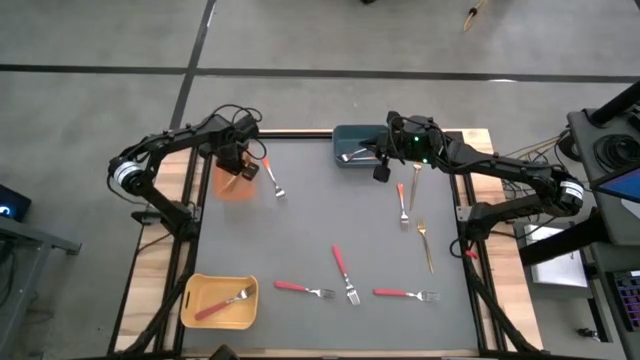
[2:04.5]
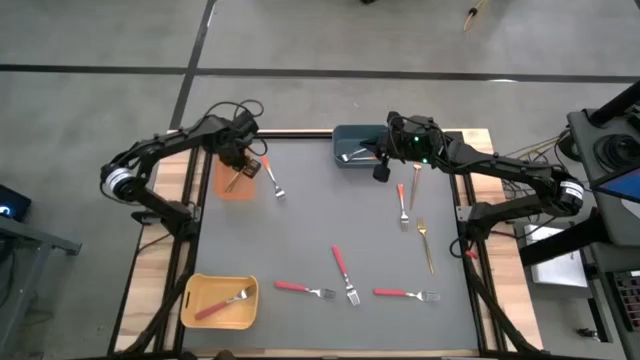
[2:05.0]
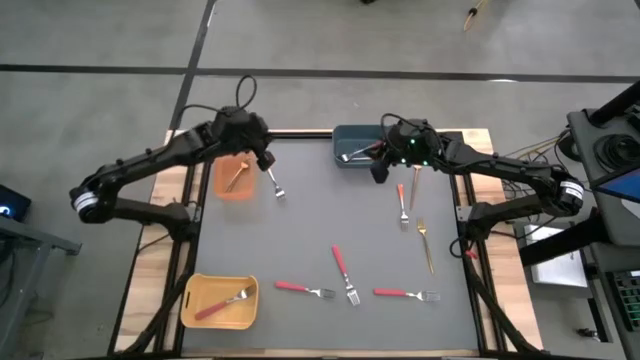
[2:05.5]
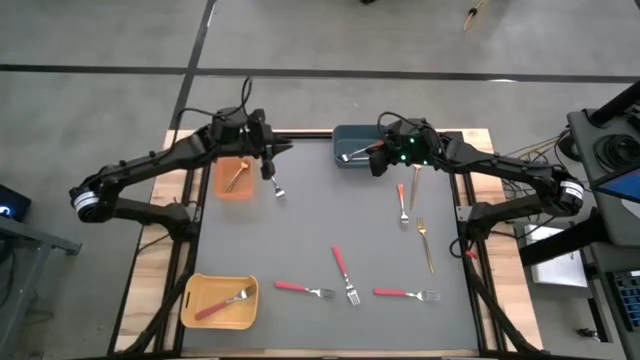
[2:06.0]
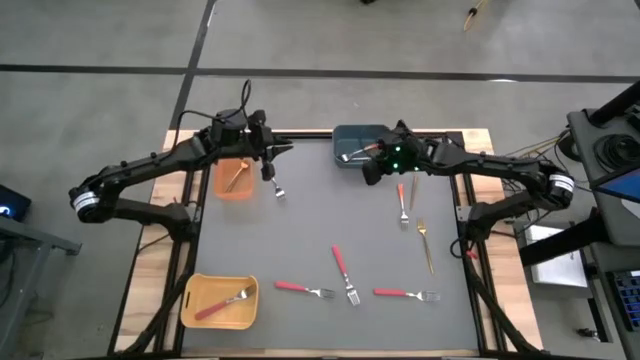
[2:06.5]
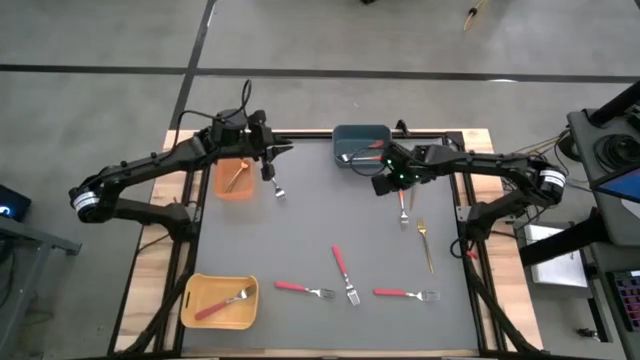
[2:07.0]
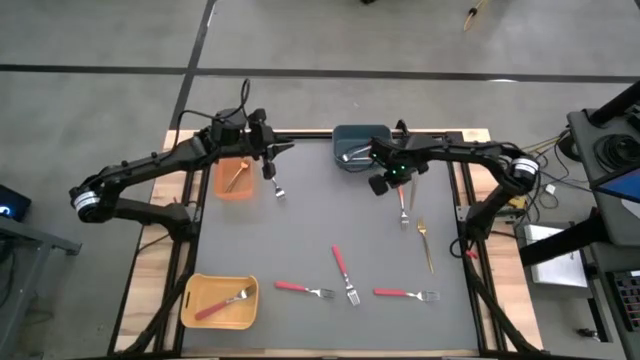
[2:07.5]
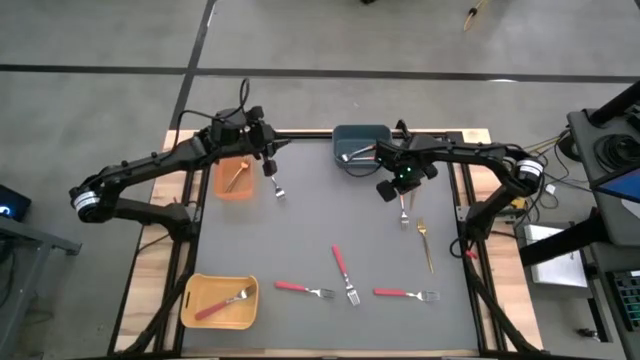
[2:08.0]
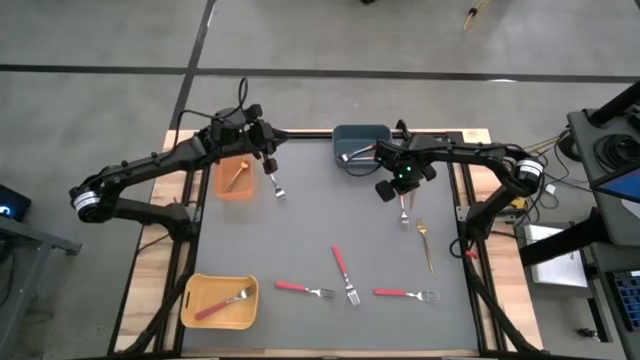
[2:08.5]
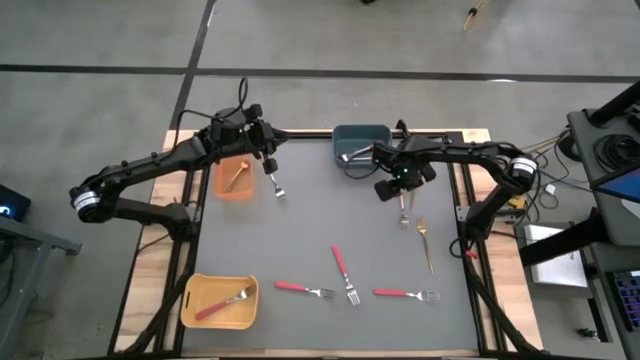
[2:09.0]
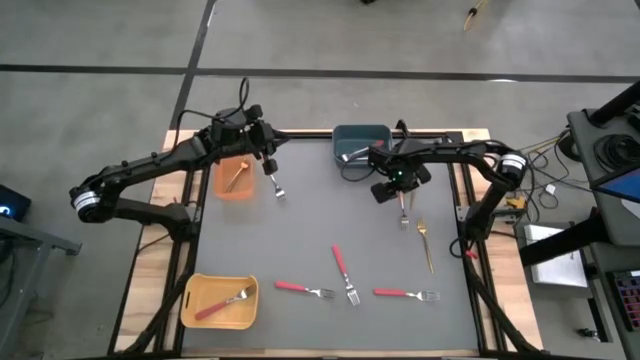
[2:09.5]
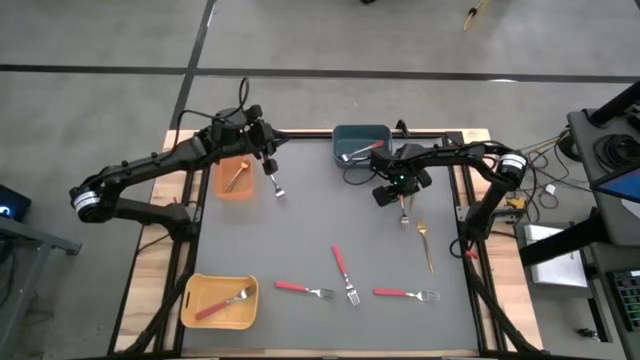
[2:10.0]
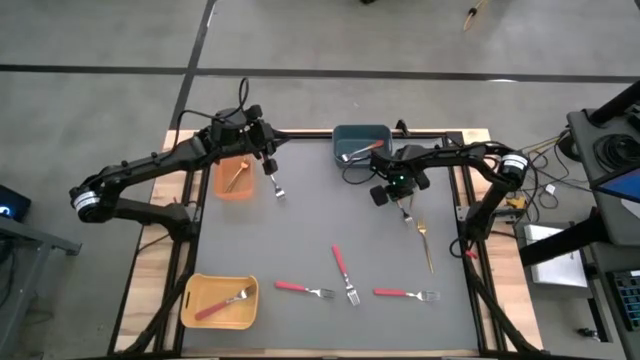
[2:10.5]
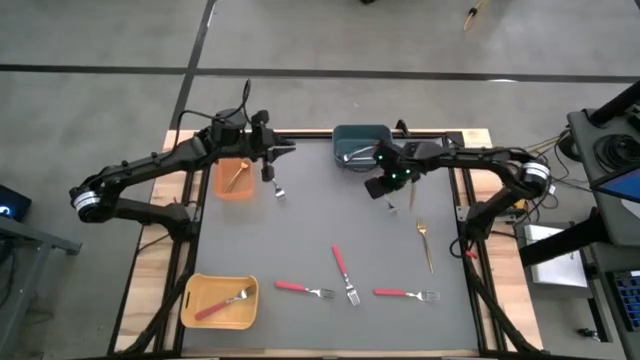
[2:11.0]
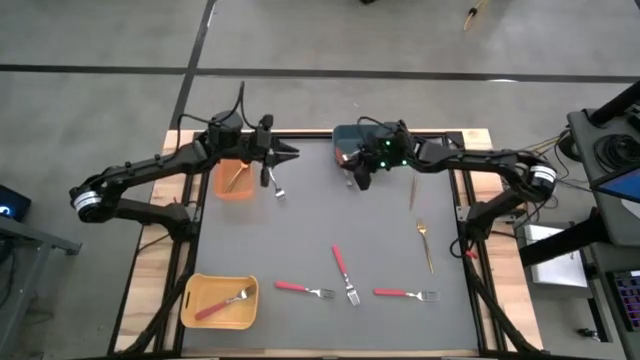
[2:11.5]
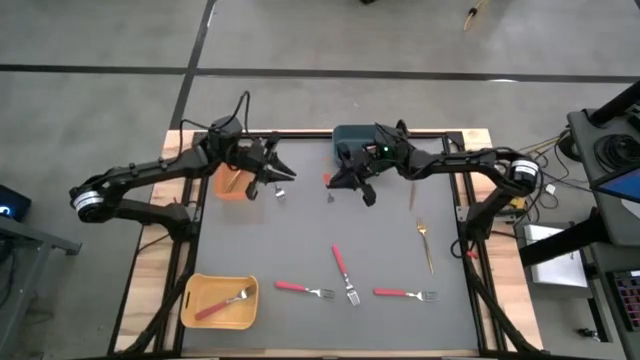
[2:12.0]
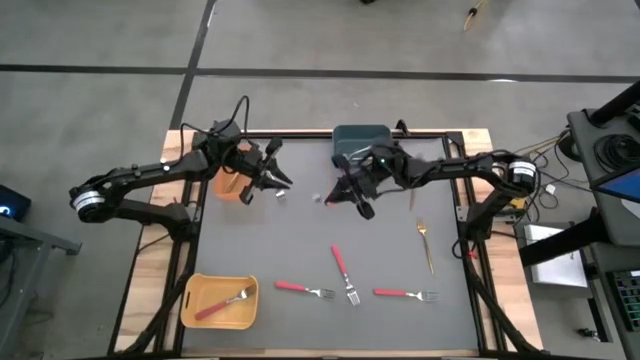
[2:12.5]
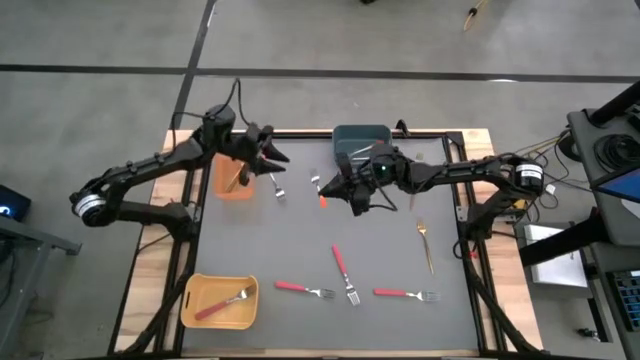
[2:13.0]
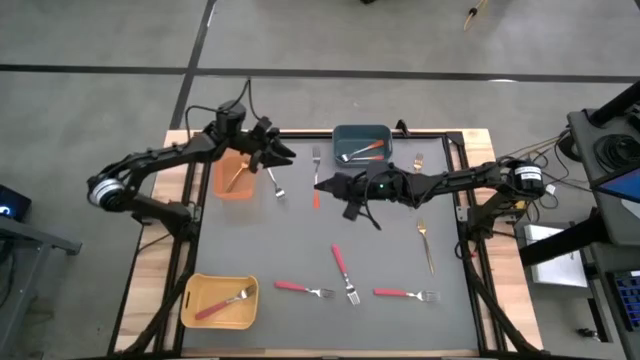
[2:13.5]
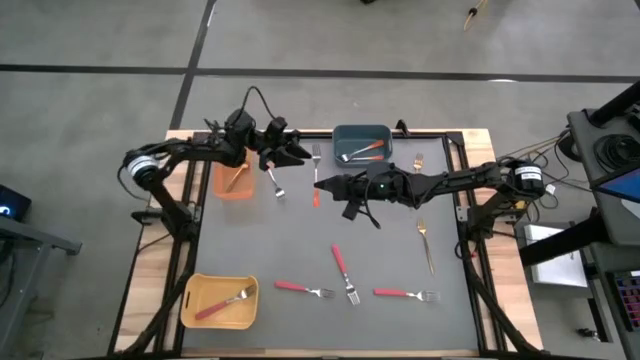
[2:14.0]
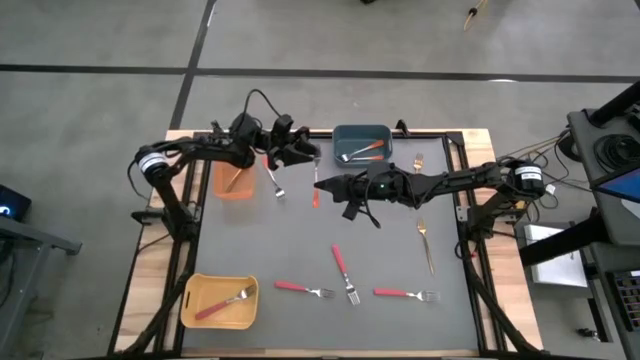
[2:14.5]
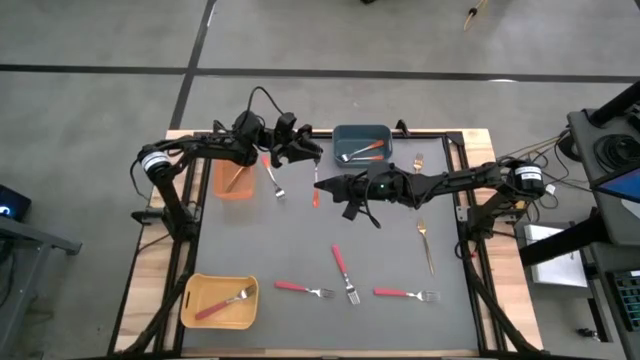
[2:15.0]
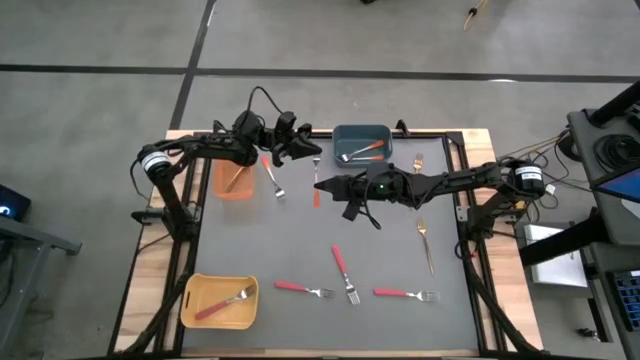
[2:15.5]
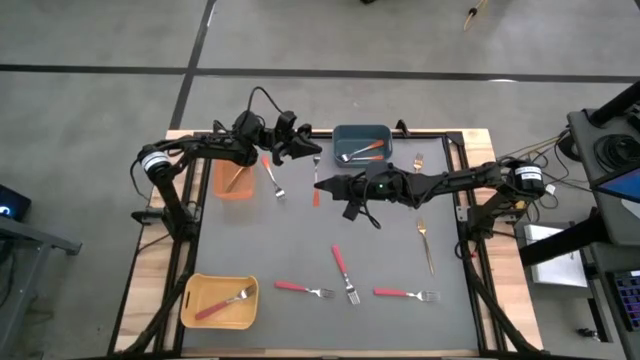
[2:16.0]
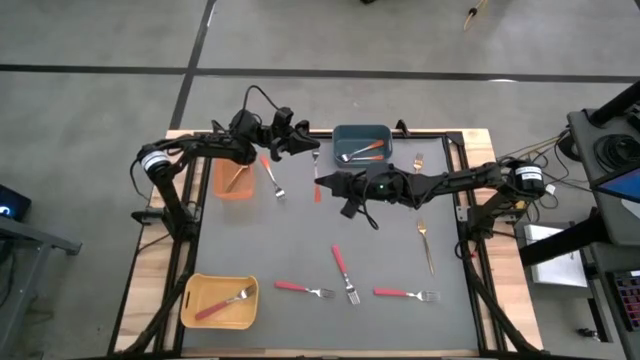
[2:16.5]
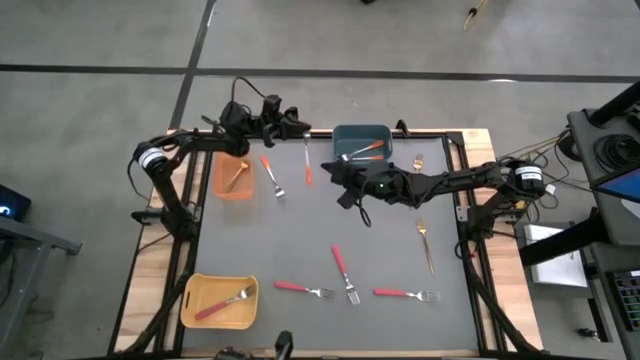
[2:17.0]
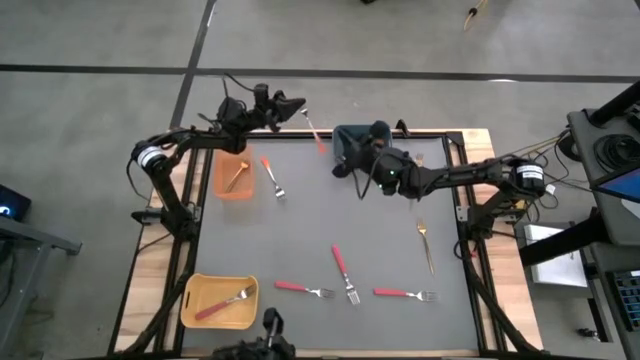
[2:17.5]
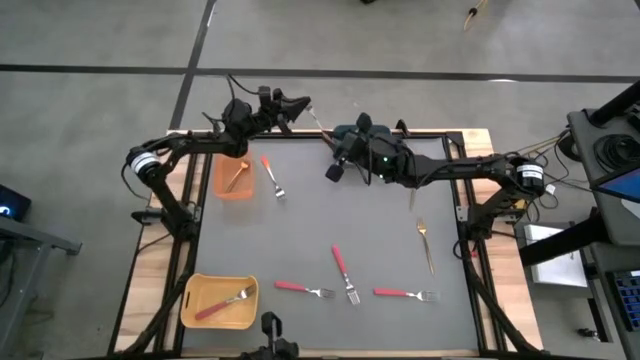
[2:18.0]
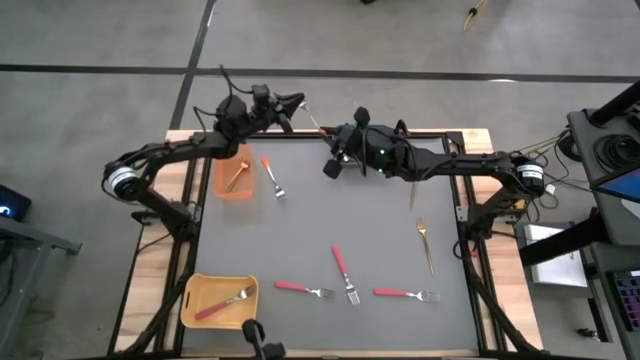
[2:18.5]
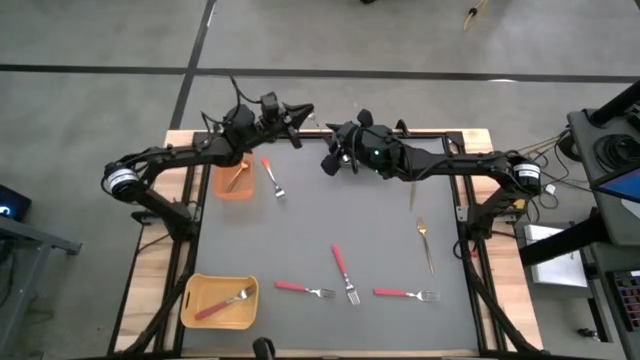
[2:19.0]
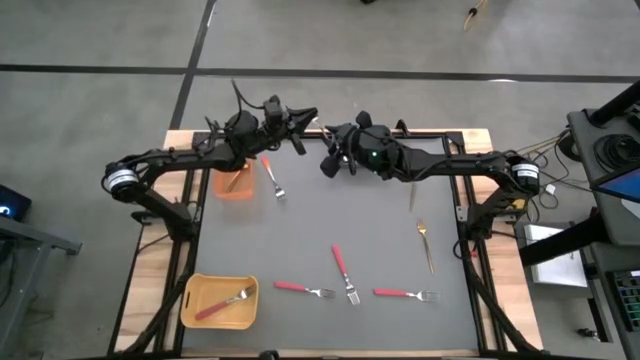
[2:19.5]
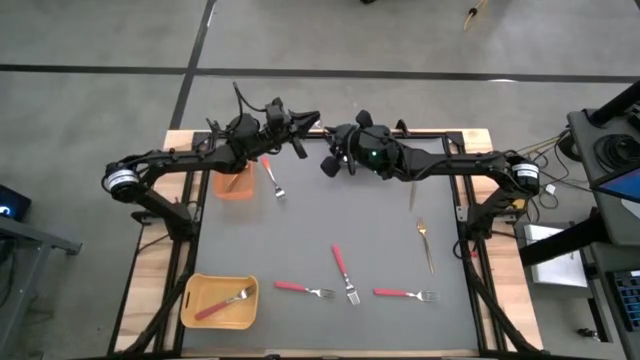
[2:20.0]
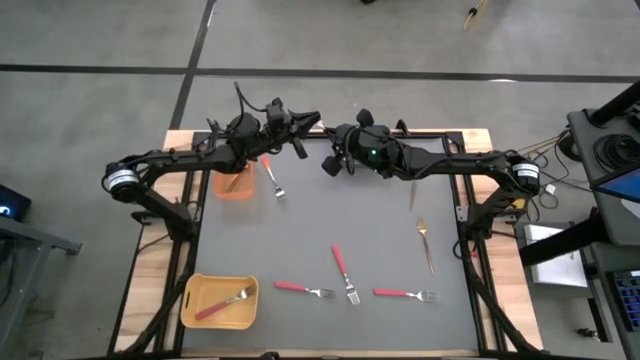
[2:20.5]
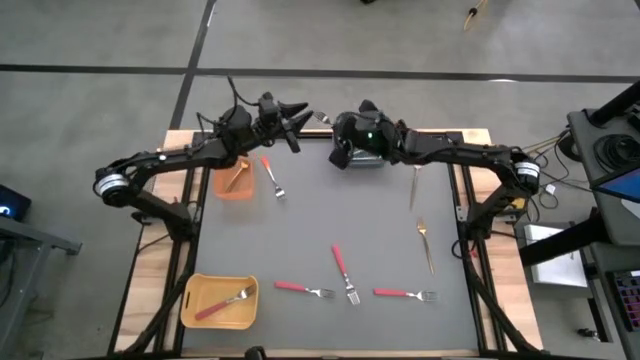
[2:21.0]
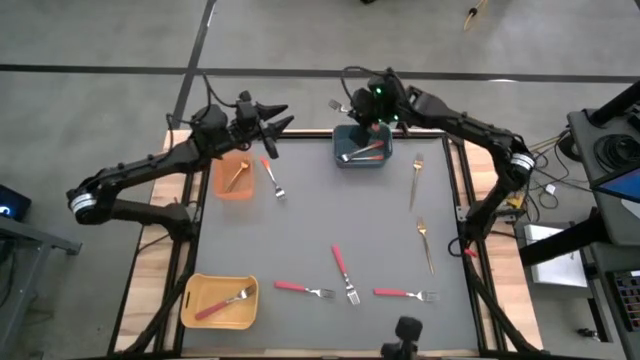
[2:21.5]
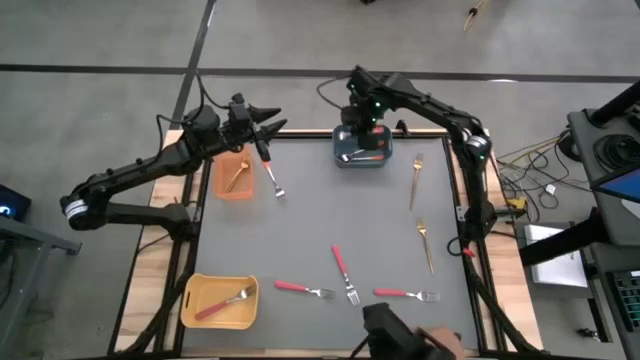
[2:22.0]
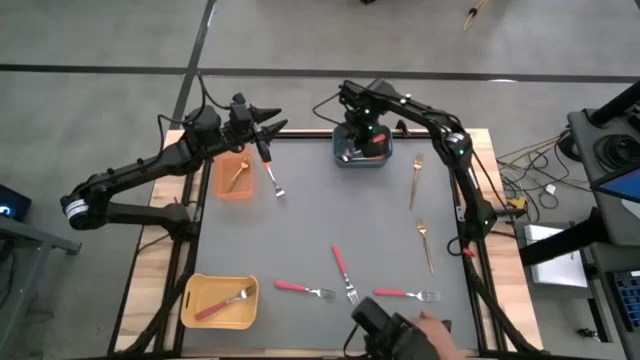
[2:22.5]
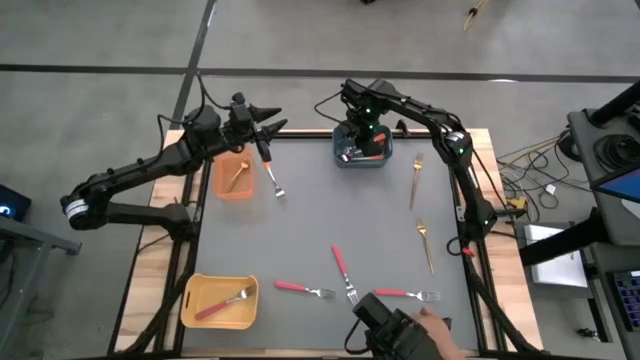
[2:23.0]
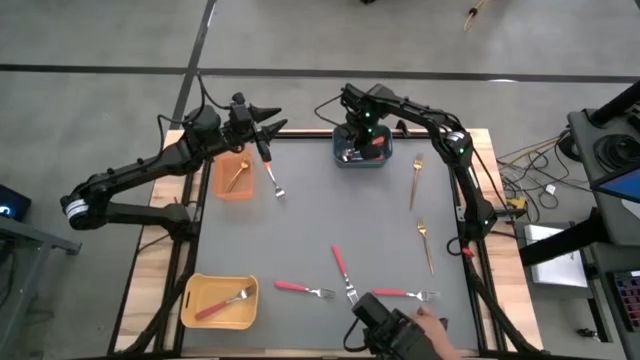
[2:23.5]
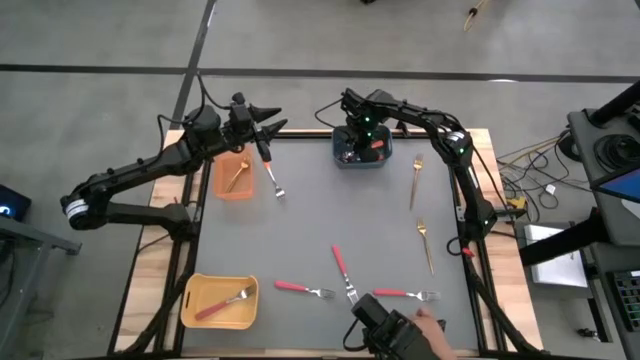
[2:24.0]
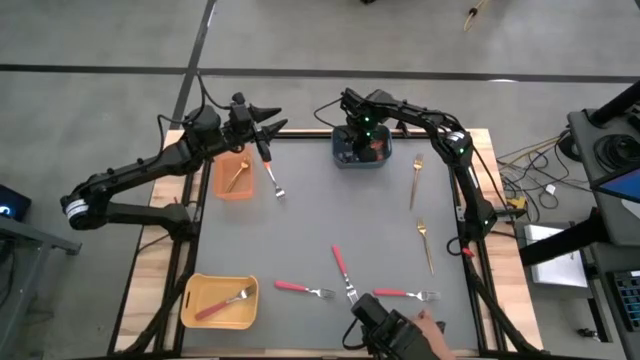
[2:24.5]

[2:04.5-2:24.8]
Task: Sort silverware by color (type)
Put the orange fork into the blue bin

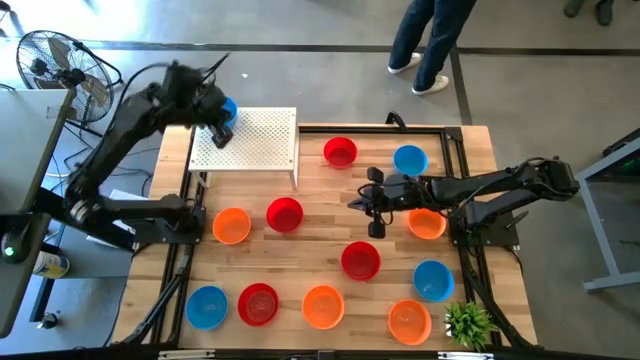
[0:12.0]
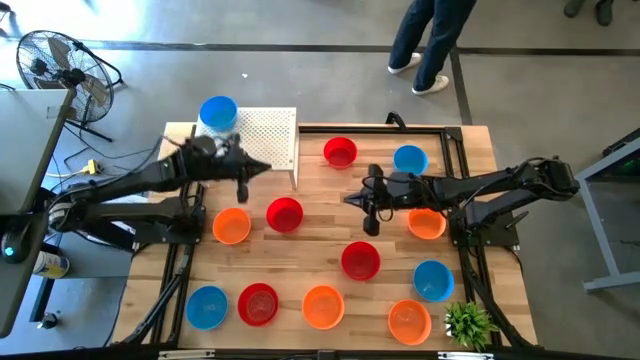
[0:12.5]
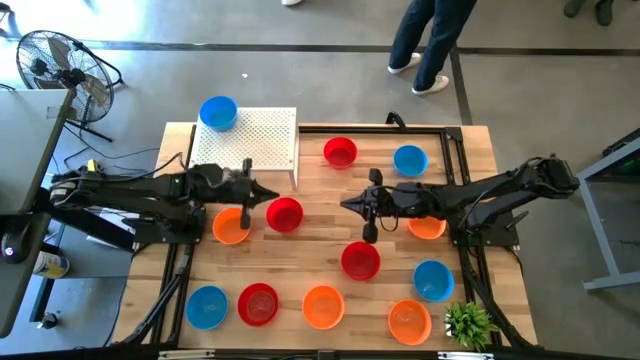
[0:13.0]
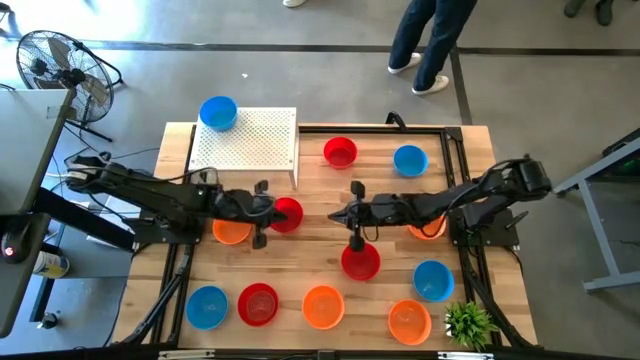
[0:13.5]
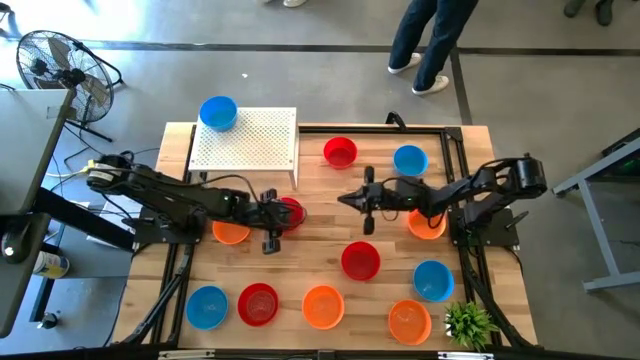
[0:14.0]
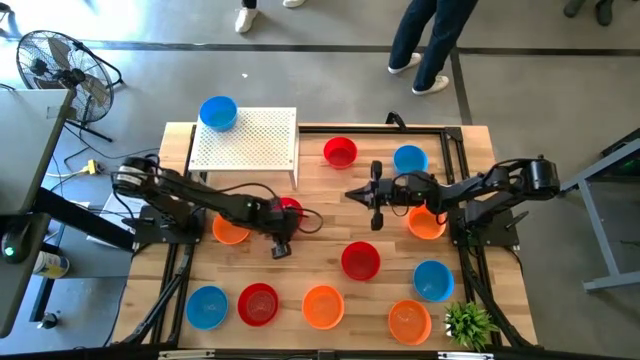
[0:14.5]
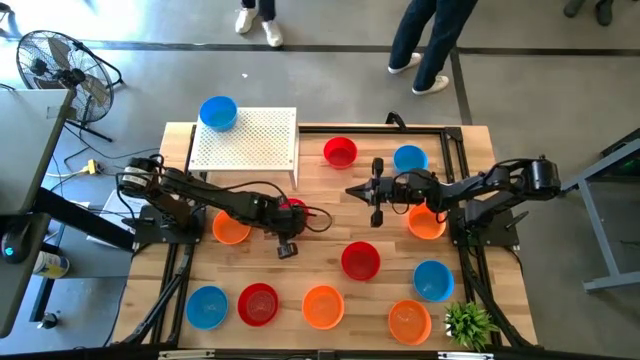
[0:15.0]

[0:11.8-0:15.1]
Task: Pick & Place Mini bowls
Put the red bowl on the shelf
